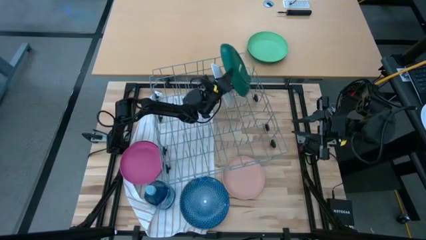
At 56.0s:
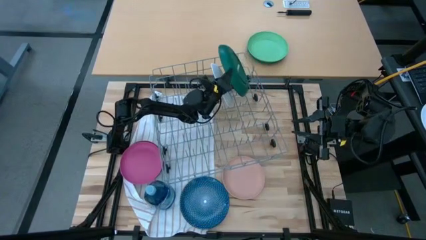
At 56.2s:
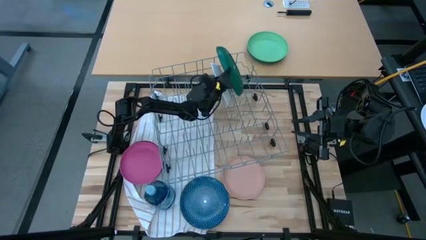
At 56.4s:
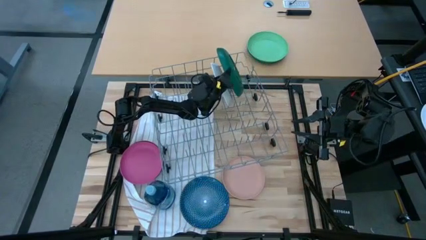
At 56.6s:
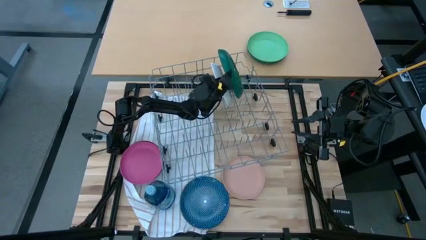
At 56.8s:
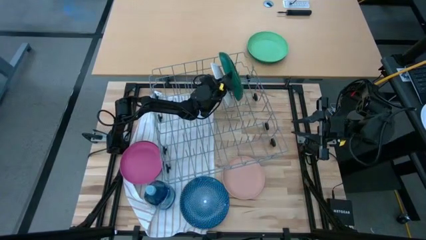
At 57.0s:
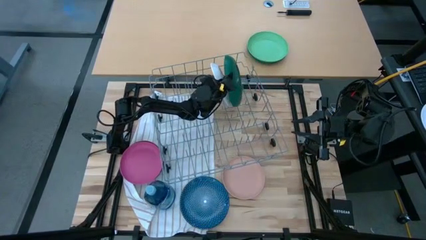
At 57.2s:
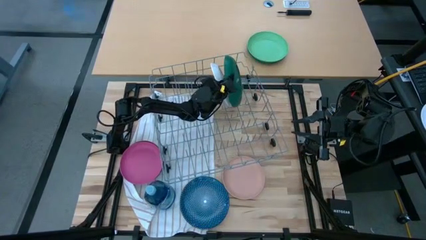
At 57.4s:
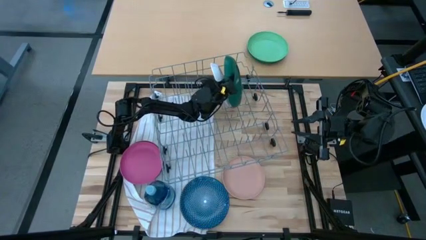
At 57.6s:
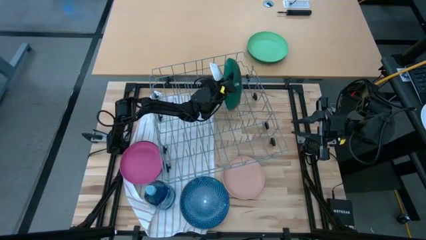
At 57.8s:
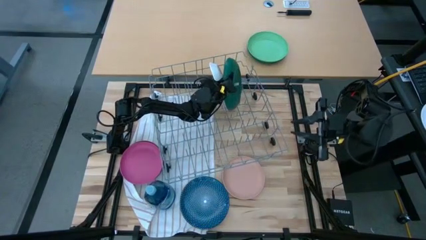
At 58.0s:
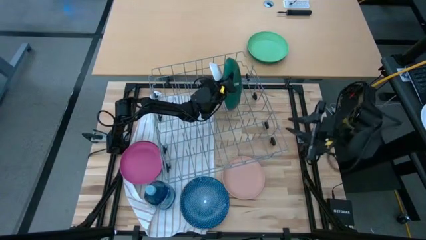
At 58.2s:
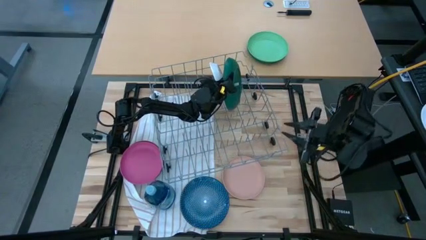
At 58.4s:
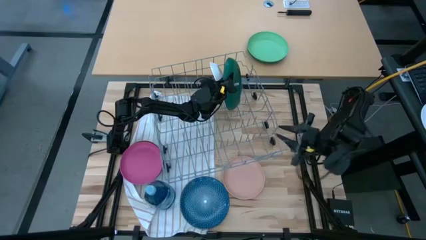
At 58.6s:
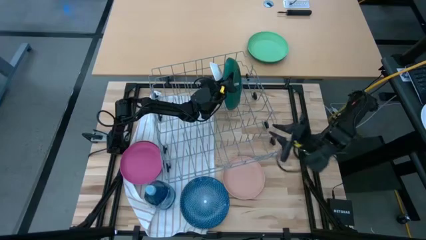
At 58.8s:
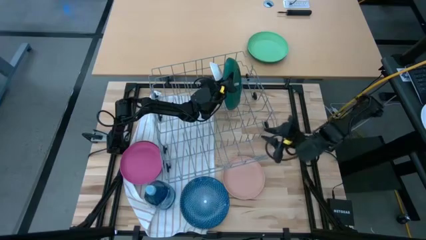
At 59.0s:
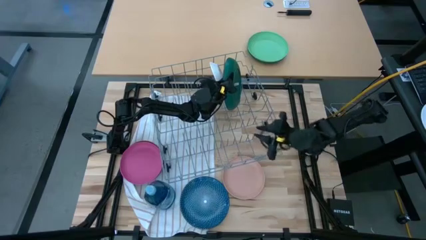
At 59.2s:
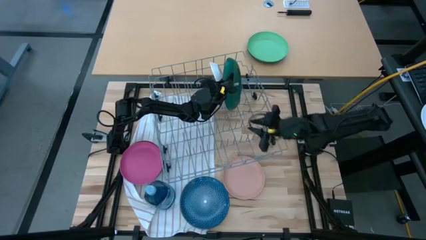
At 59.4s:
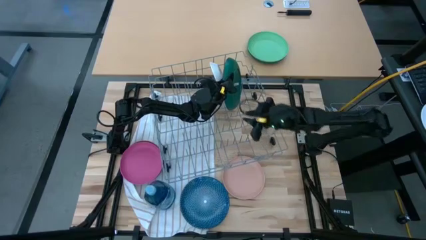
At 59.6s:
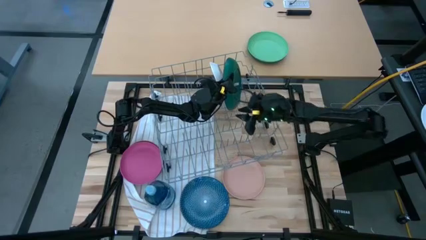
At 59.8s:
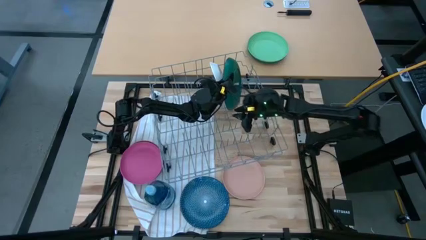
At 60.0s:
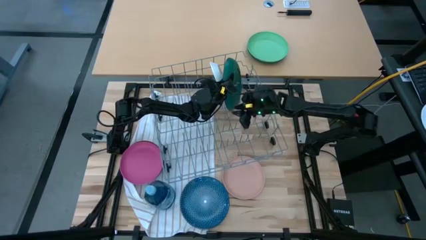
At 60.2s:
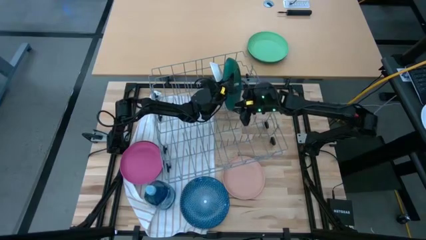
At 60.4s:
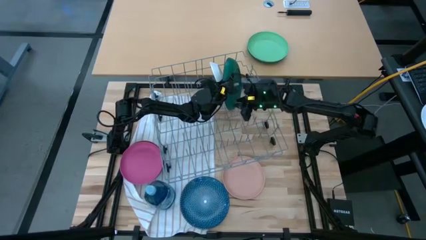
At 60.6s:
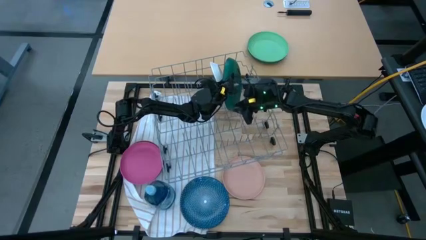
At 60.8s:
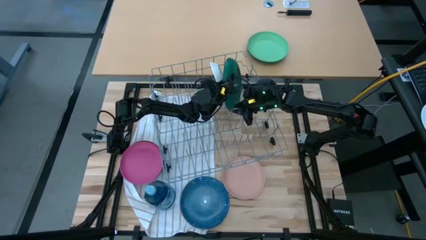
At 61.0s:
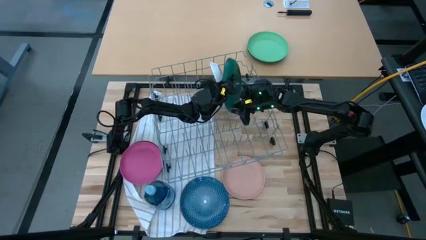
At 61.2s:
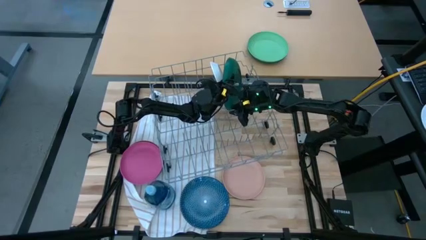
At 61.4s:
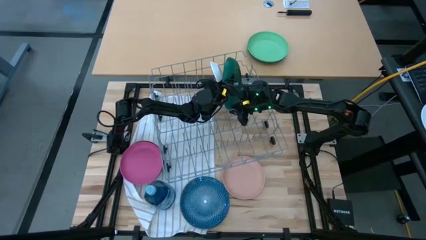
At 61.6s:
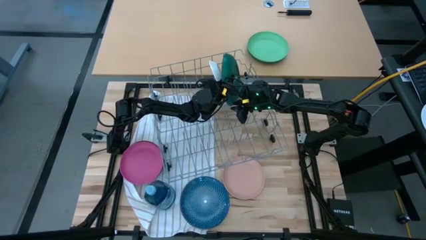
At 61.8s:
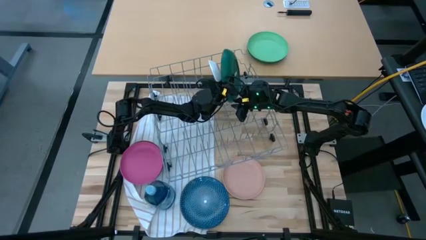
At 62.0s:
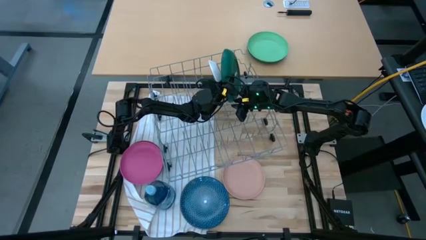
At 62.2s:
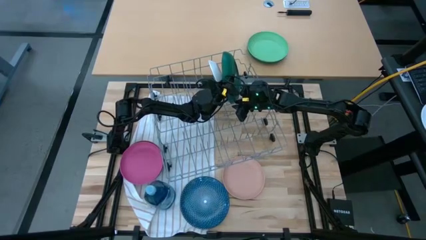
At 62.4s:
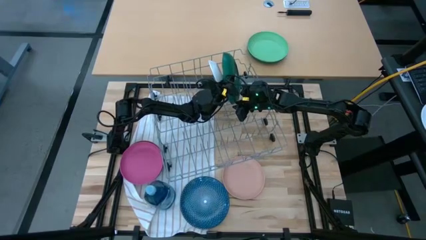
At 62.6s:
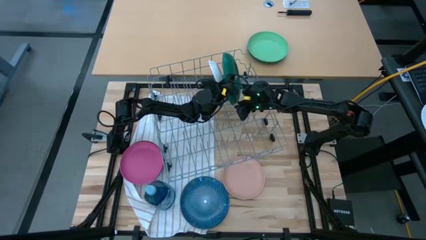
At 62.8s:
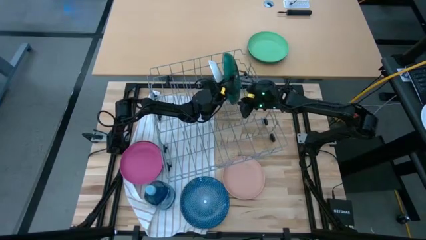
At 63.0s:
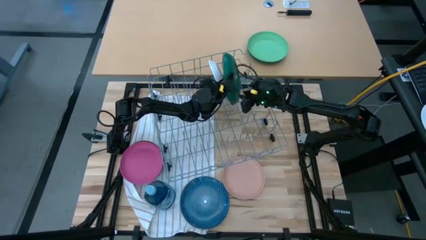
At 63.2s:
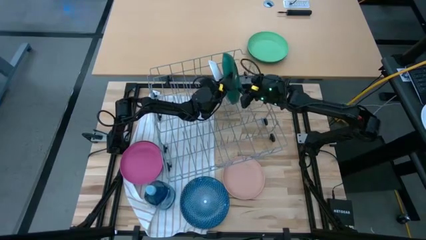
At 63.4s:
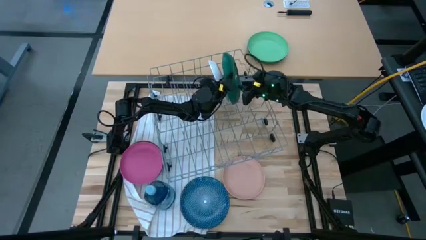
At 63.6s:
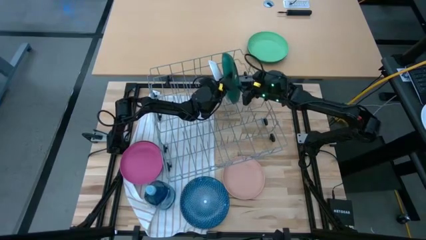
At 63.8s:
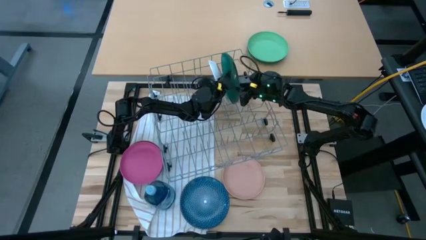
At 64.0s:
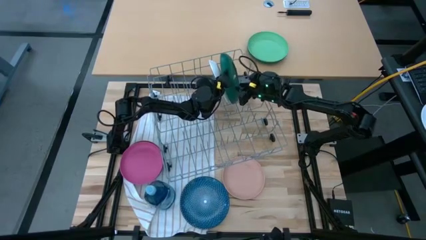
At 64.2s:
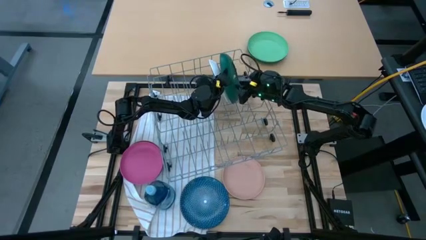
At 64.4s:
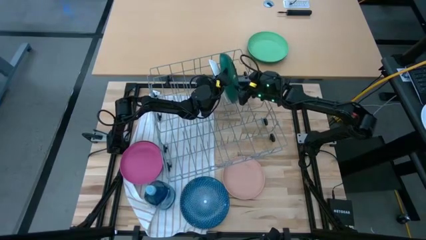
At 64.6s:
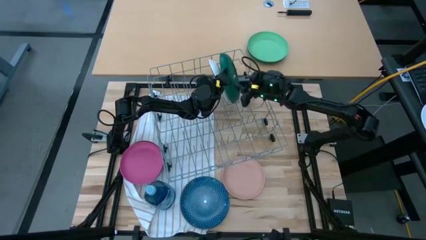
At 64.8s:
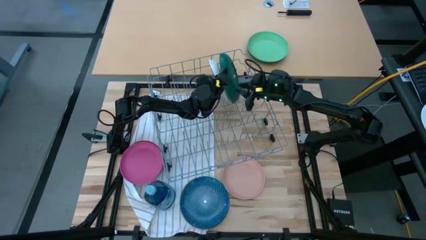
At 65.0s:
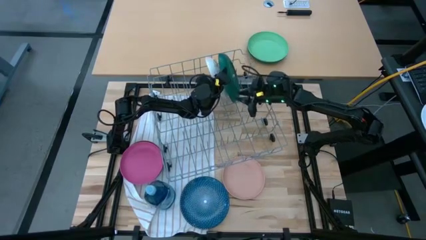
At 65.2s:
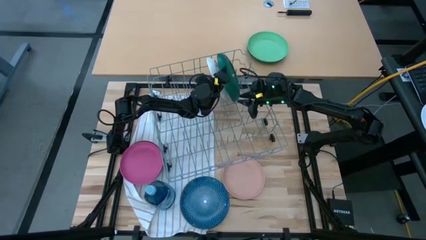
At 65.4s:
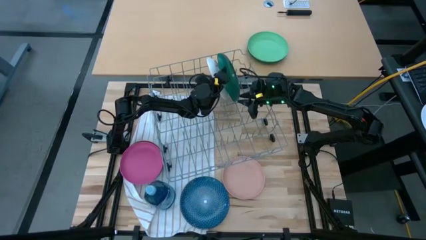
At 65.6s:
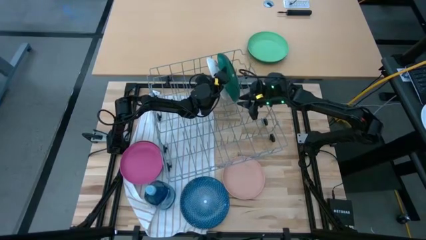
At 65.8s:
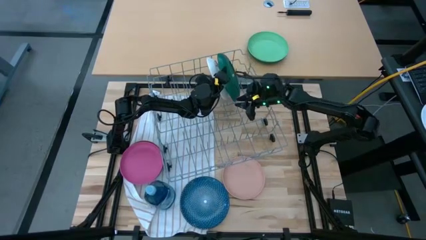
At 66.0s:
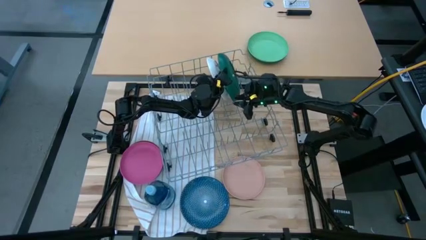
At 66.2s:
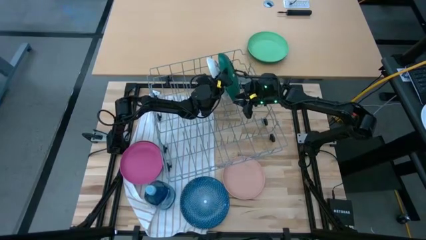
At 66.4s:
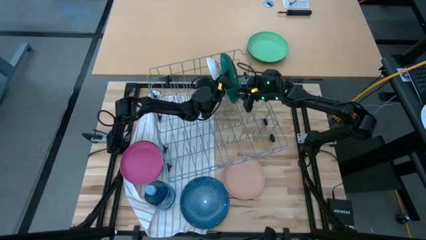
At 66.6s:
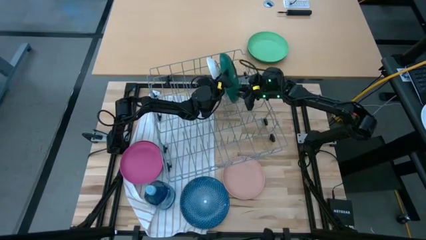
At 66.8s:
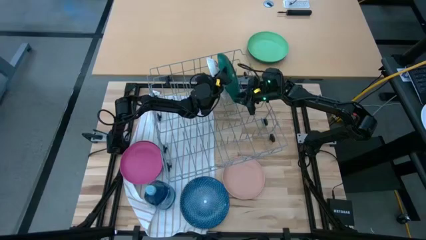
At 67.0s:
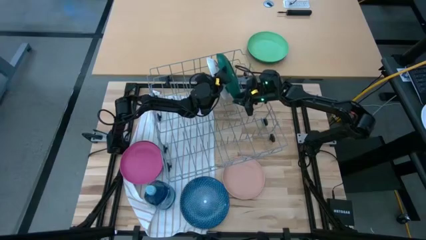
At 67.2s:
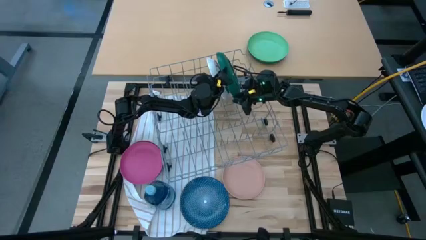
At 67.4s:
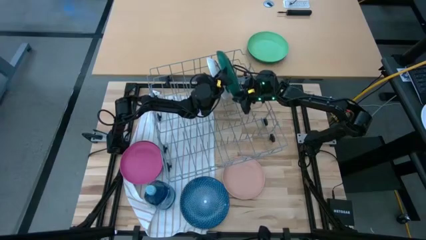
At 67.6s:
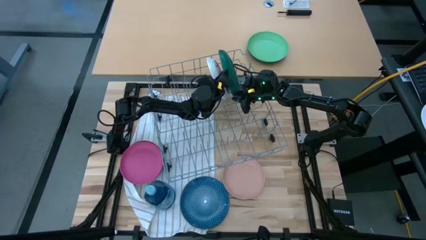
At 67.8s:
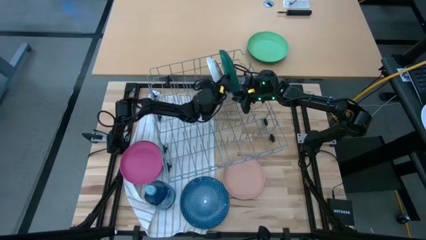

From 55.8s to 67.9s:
Task: Sort dishes
Put the green plate into the dish rack

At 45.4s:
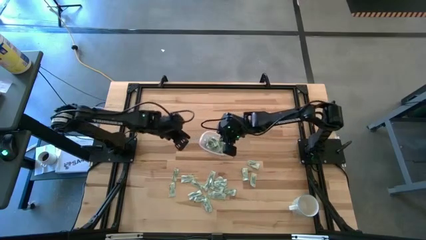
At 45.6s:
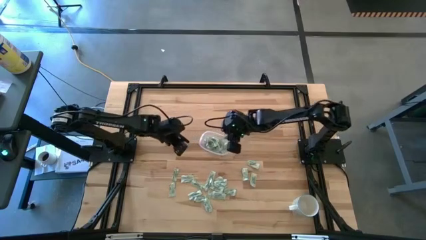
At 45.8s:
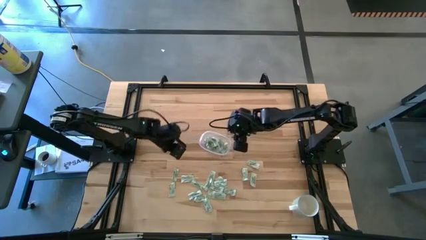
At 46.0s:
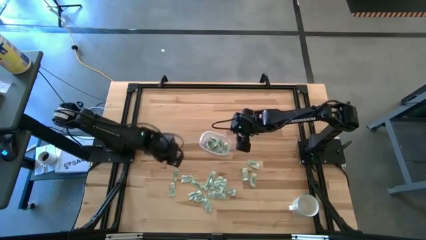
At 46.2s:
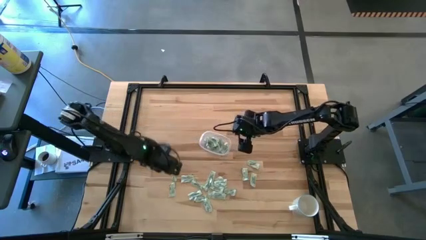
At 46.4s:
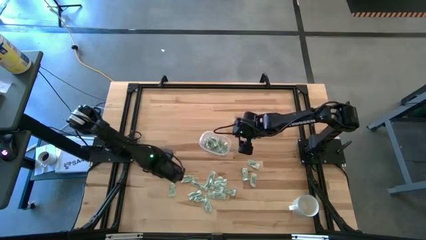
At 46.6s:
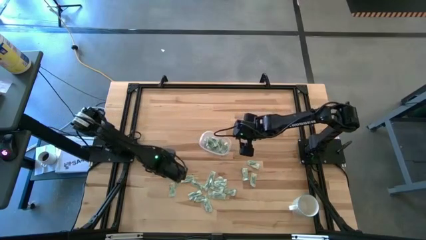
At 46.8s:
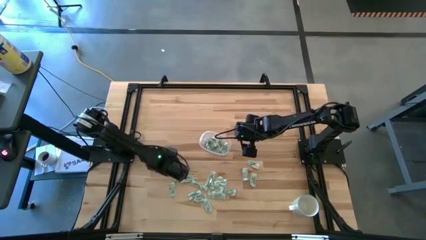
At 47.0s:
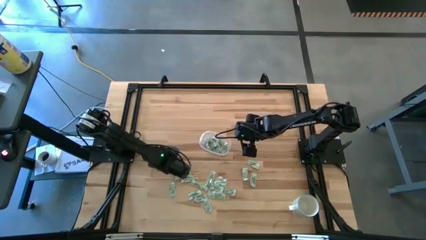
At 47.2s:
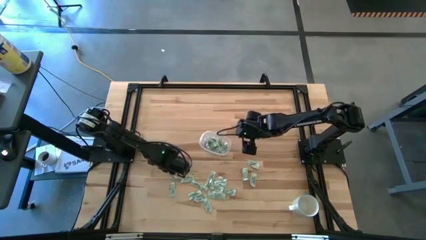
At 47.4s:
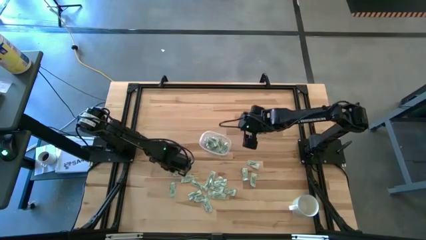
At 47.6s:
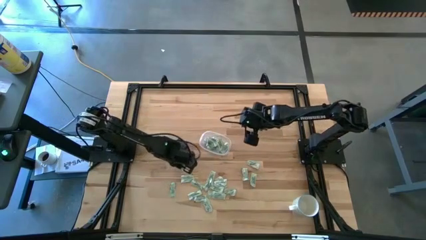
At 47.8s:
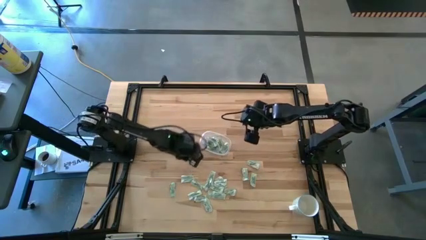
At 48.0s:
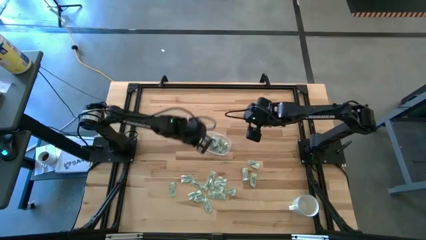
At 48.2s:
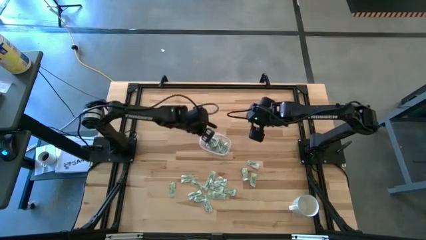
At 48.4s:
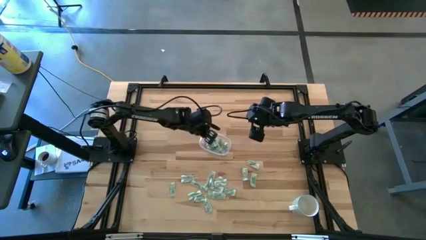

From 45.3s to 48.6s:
Task: Pick and place Stevia / Truvia into bins
Put the stevia packet into the transparent container

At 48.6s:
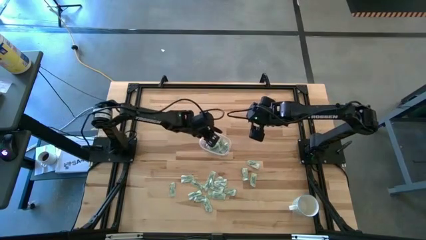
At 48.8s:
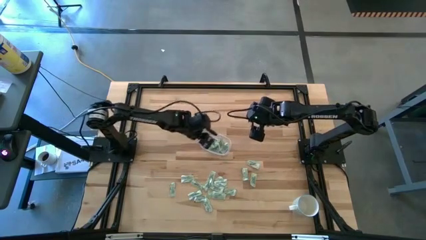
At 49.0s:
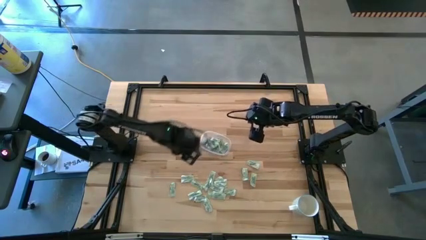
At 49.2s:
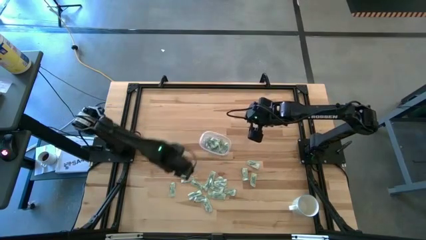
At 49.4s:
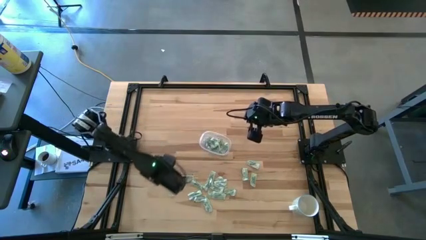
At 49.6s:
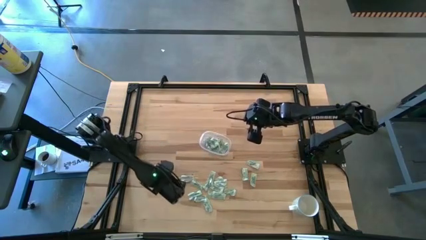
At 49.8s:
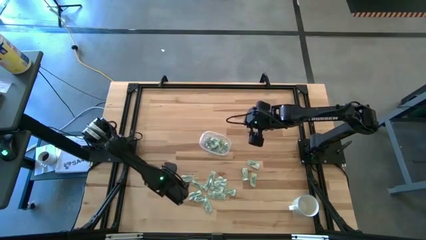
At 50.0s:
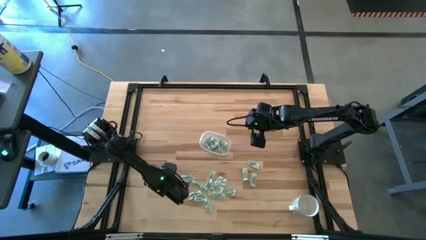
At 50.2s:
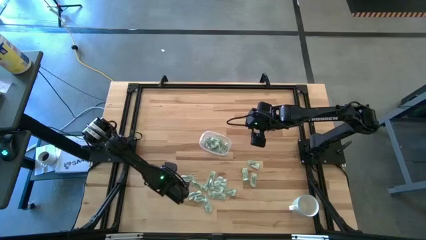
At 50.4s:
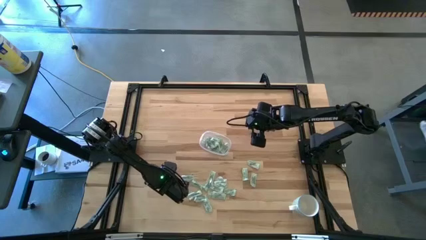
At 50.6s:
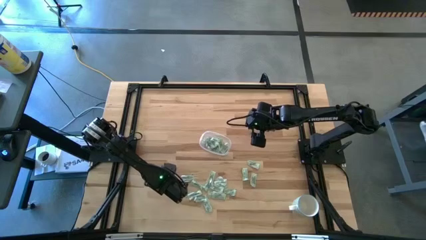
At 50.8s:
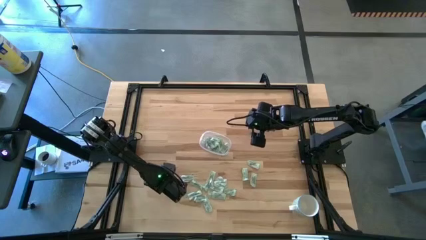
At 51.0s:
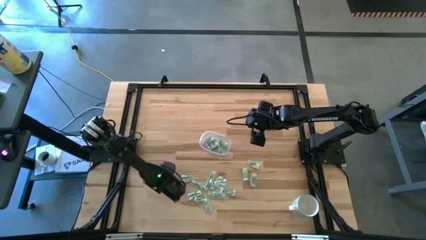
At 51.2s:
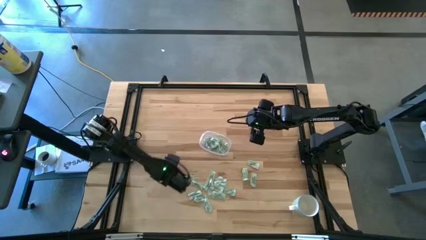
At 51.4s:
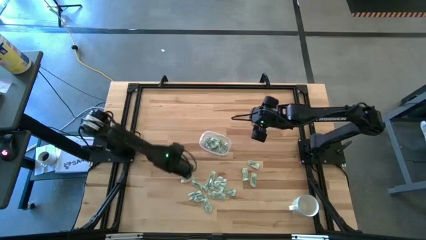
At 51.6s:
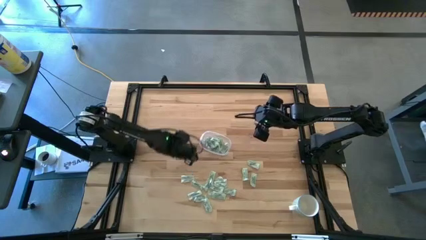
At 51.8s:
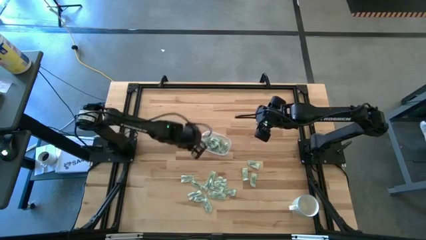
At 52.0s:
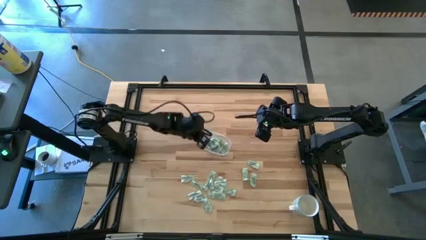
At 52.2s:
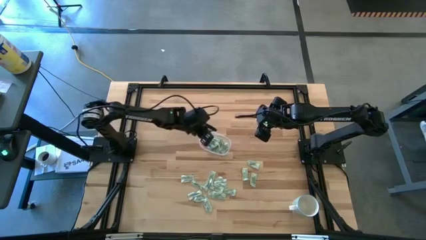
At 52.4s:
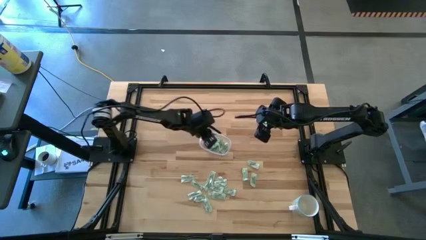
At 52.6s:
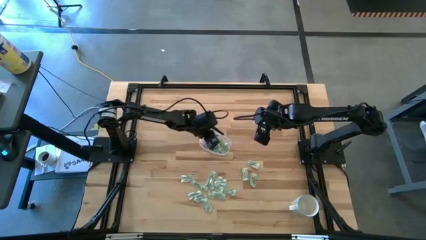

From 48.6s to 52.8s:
Put the stevia packet into the transparent container
